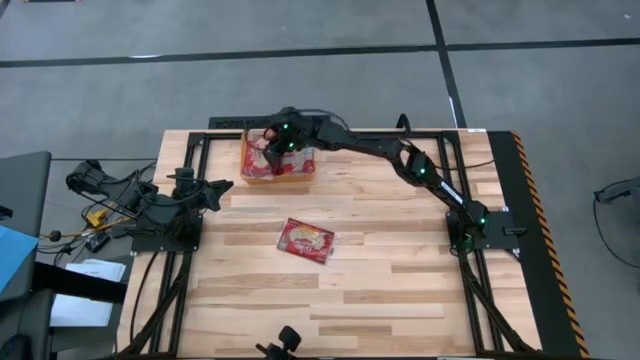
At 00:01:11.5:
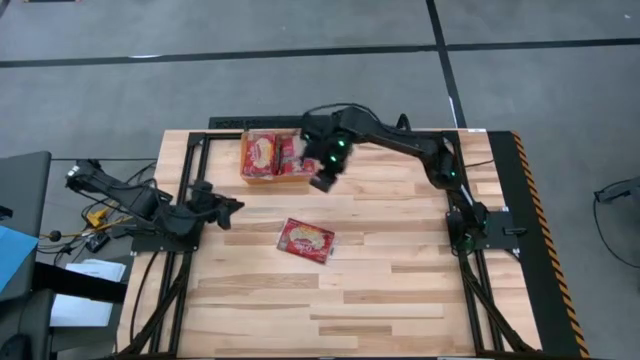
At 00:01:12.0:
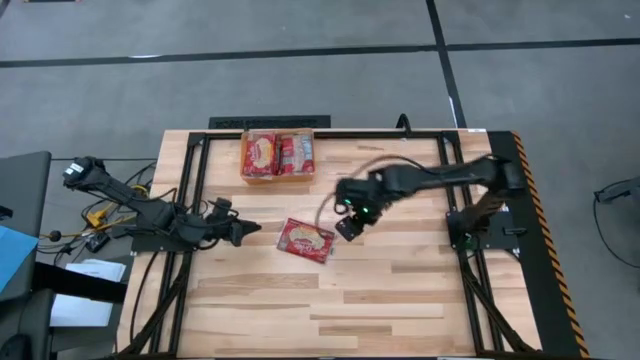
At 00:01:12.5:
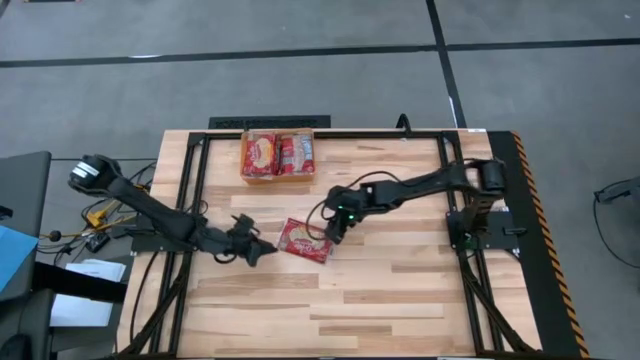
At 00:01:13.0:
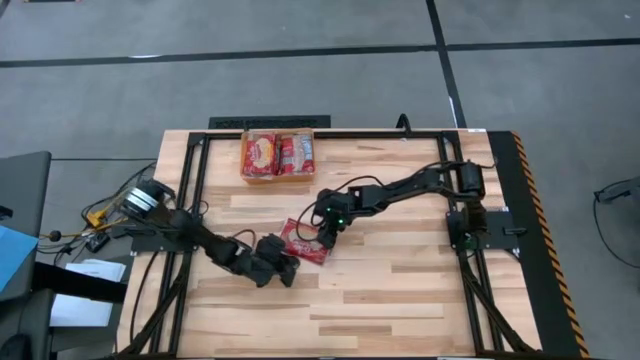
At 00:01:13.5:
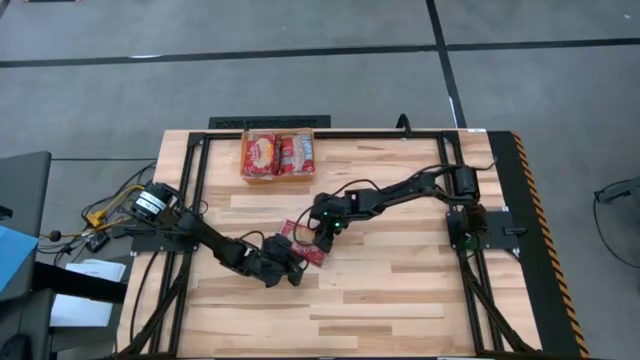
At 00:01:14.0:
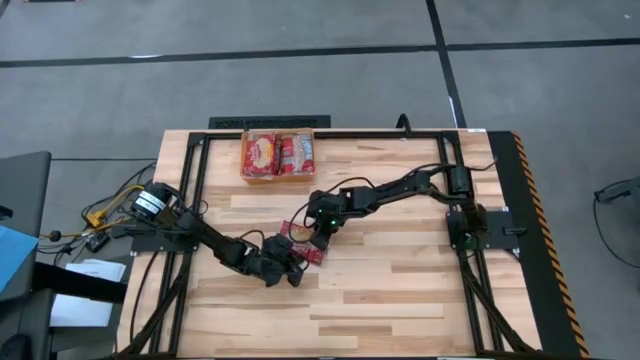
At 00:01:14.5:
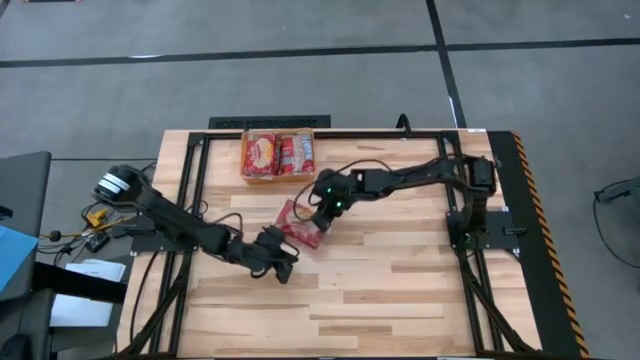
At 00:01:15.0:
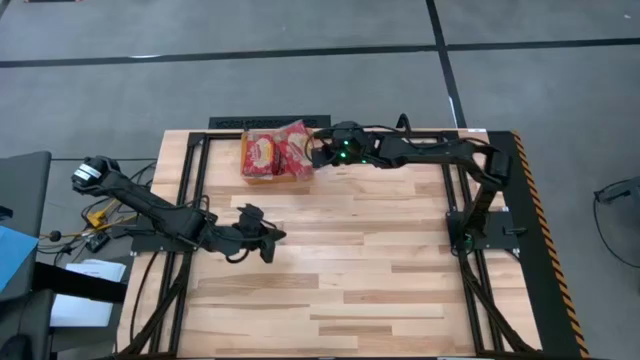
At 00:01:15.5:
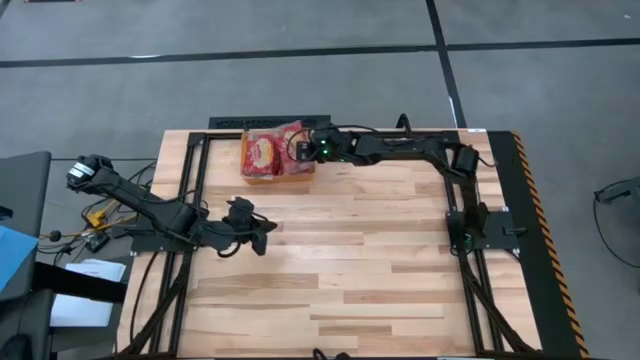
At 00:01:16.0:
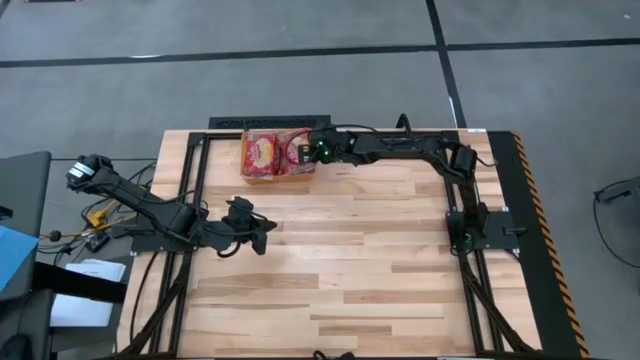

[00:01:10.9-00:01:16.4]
Task: Sort popcorn bags into baskets
Put the popcorn bag into the orange bin

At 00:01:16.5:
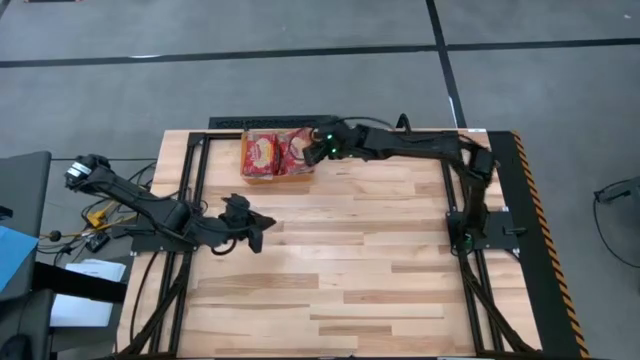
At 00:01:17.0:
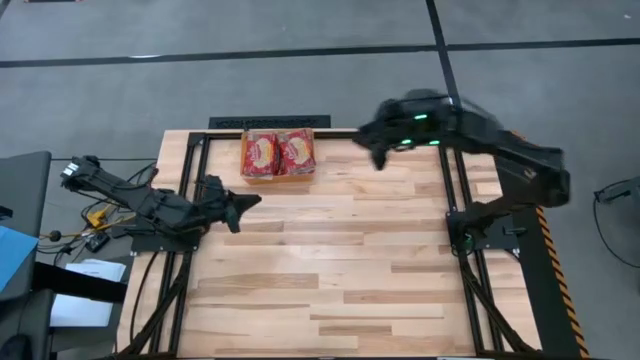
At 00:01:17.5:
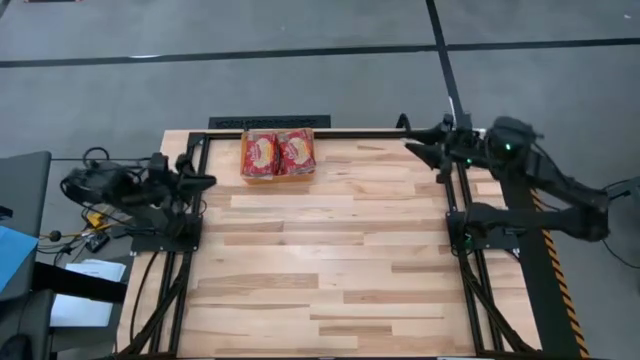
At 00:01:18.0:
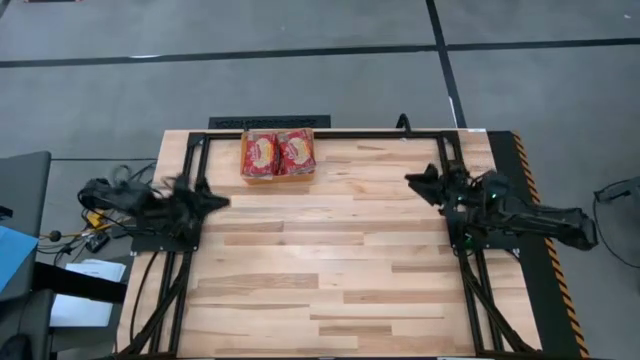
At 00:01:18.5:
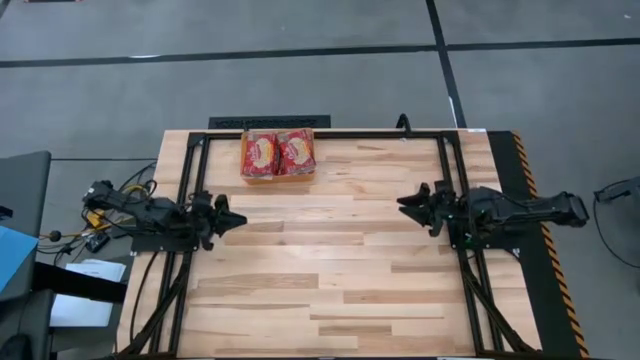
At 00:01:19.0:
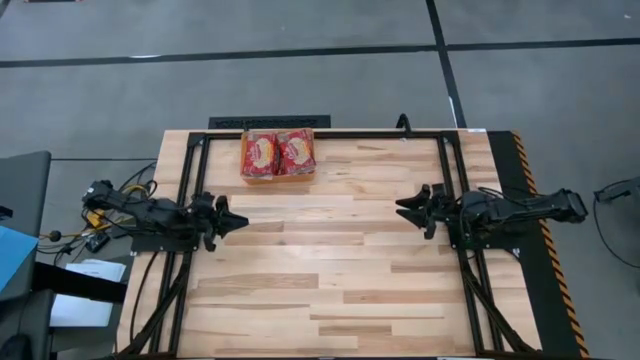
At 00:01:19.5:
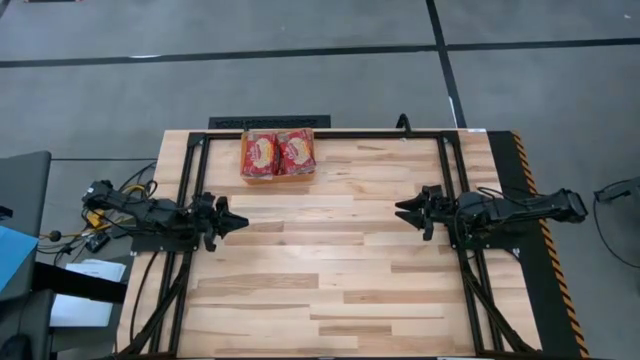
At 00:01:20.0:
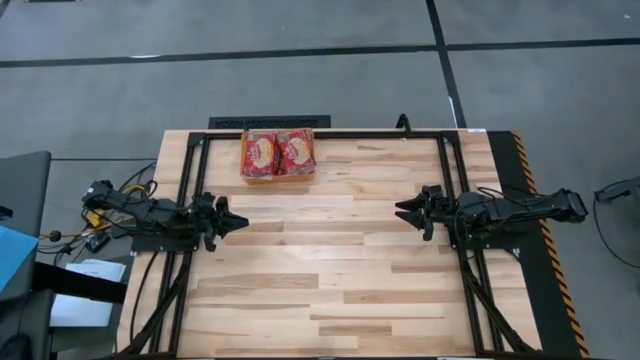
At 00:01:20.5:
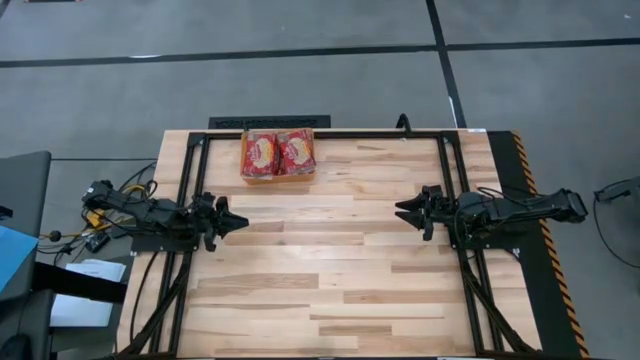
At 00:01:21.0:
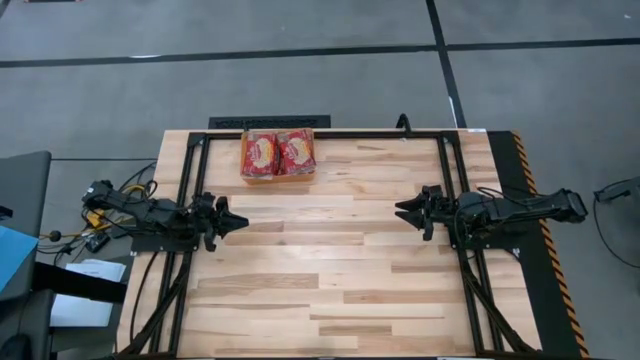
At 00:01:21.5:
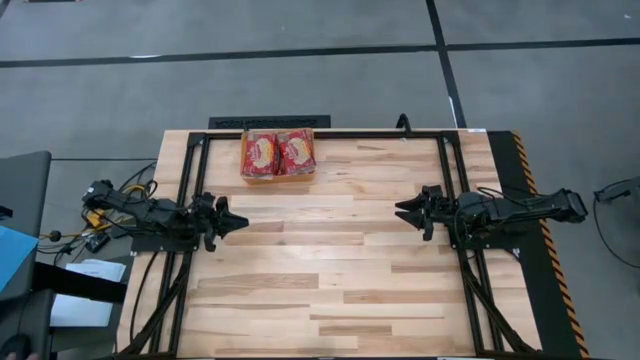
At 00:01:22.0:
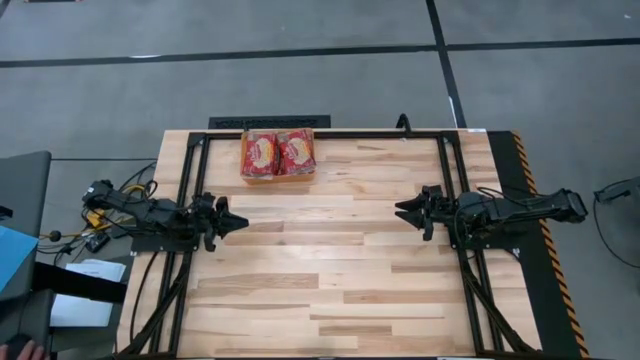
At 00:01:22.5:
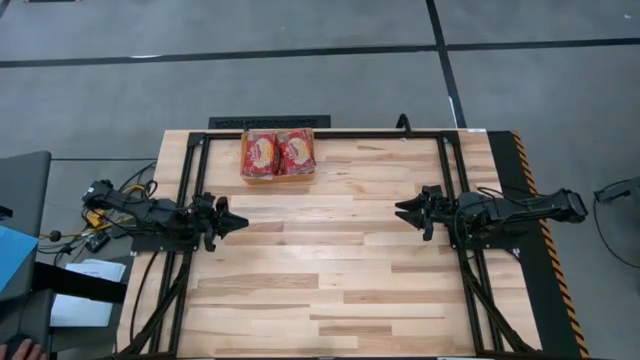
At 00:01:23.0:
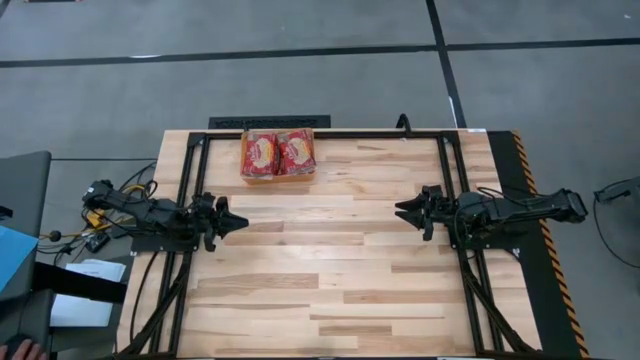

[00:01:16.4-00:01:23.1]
Return To Home Position

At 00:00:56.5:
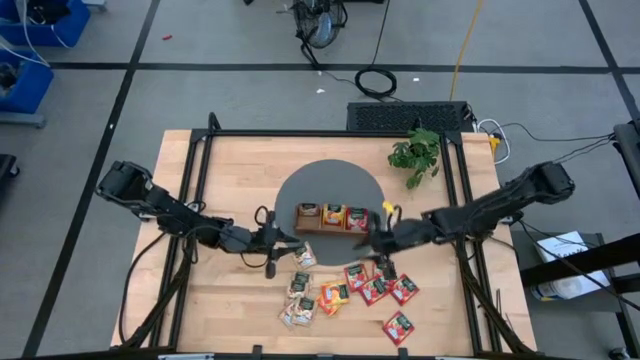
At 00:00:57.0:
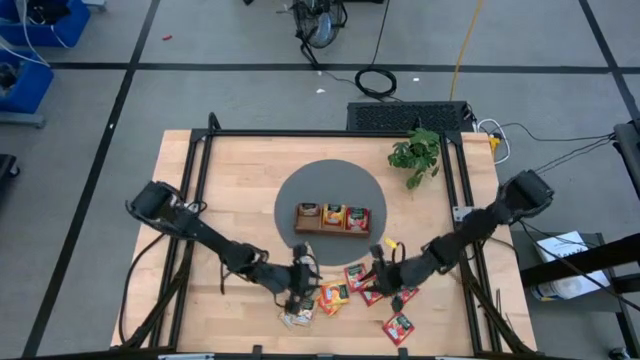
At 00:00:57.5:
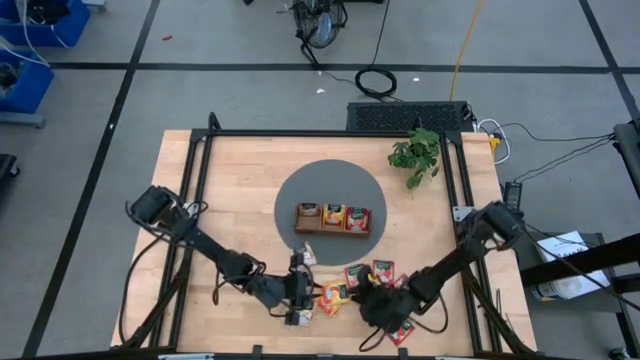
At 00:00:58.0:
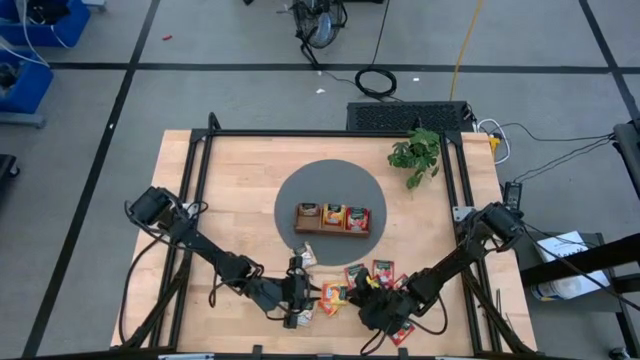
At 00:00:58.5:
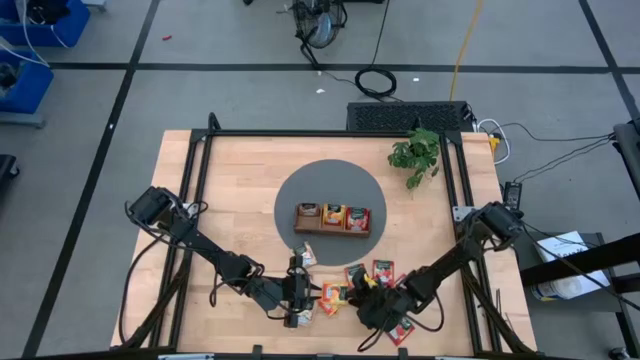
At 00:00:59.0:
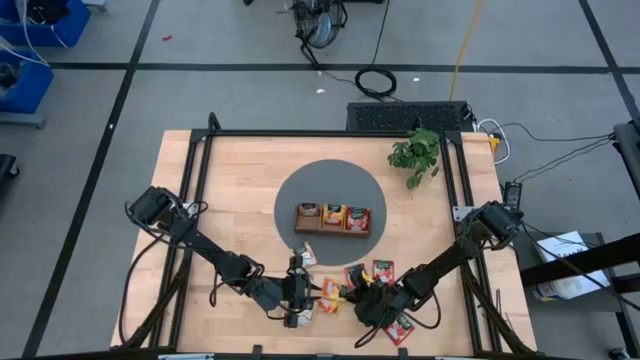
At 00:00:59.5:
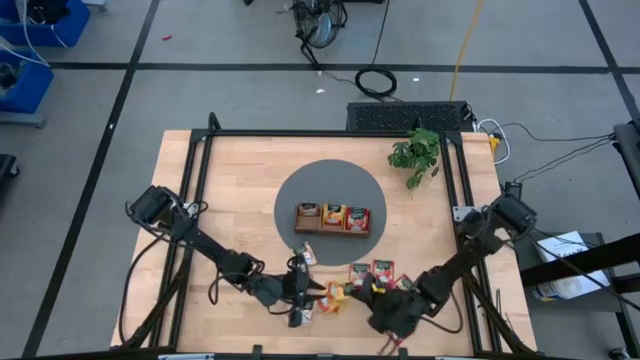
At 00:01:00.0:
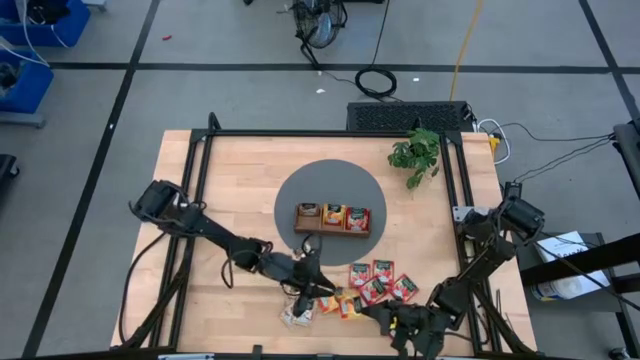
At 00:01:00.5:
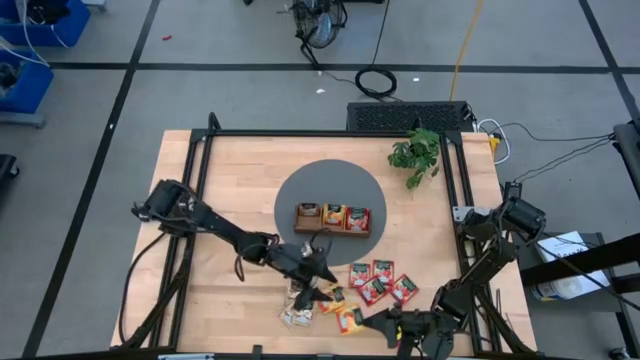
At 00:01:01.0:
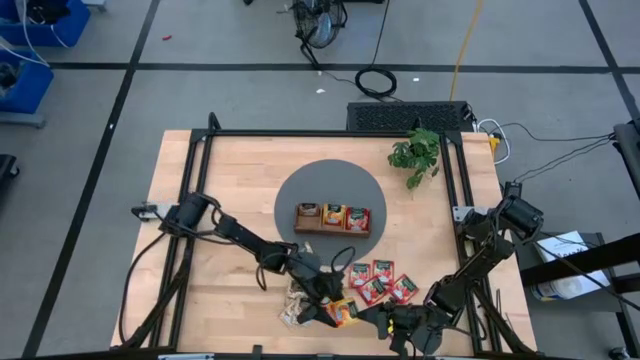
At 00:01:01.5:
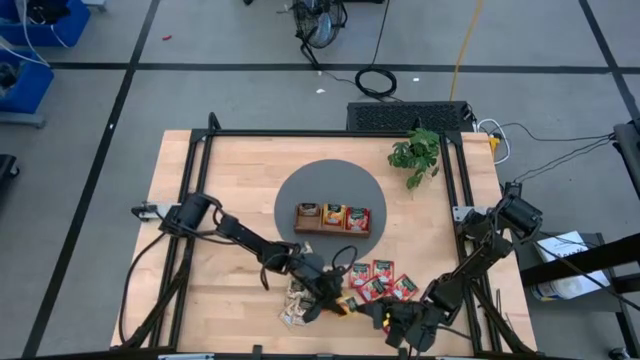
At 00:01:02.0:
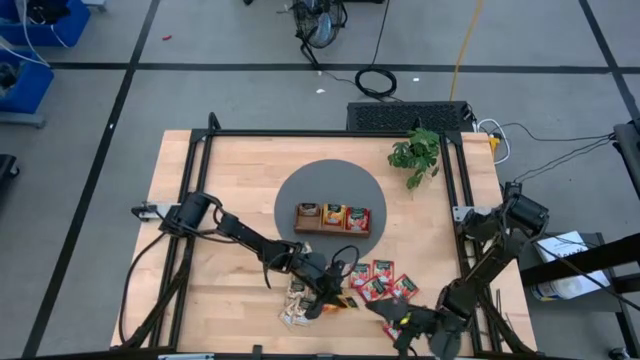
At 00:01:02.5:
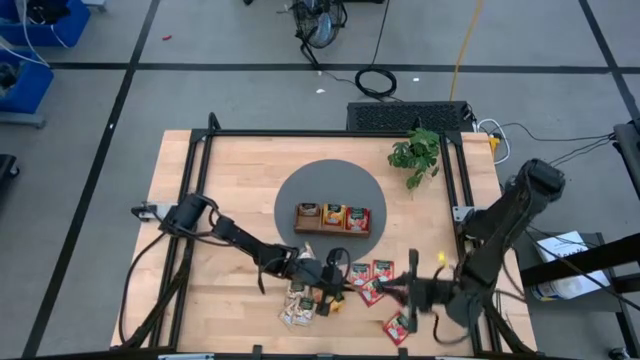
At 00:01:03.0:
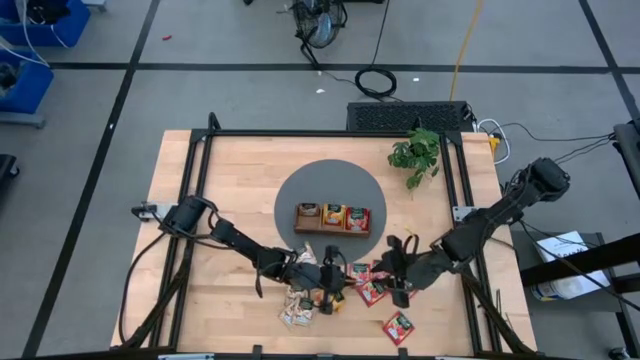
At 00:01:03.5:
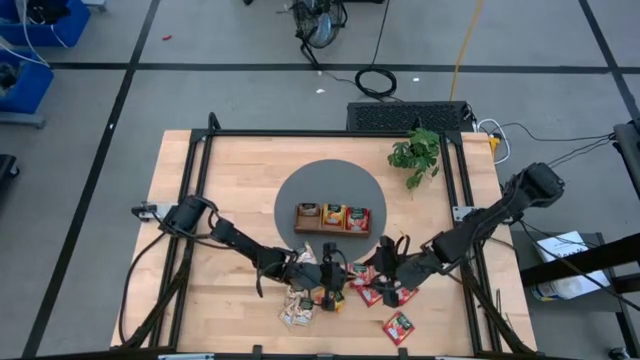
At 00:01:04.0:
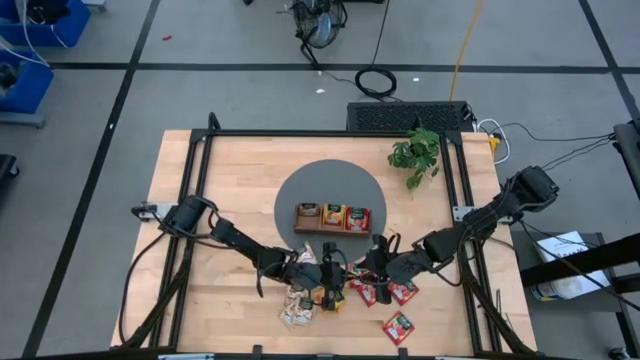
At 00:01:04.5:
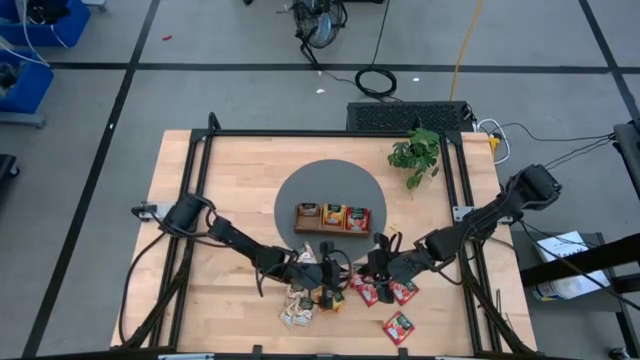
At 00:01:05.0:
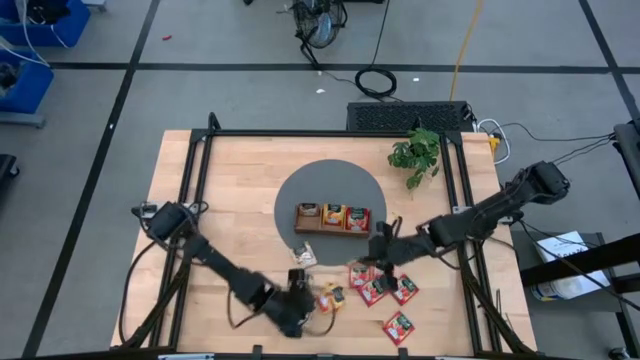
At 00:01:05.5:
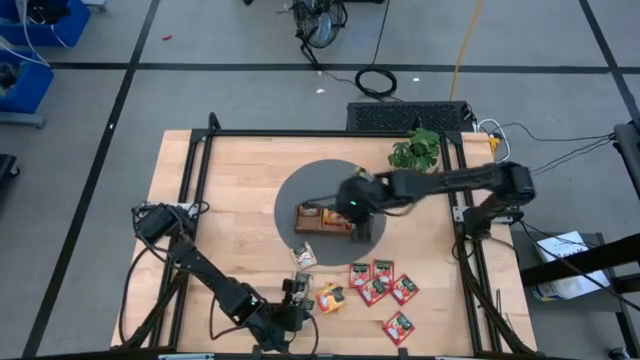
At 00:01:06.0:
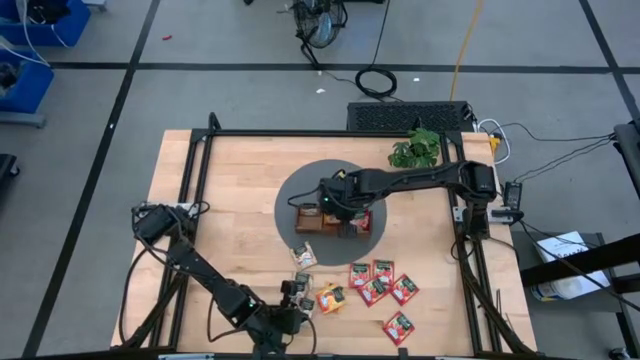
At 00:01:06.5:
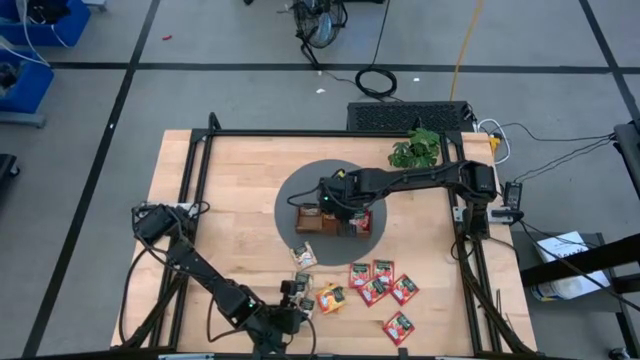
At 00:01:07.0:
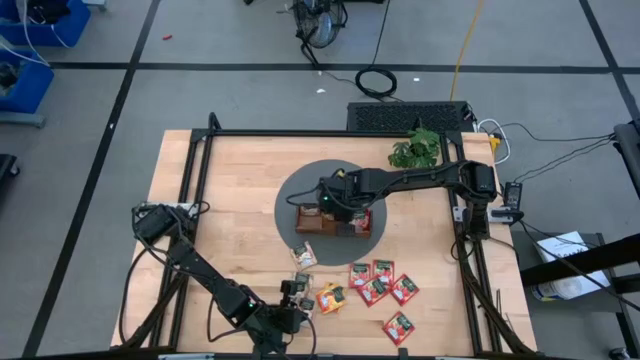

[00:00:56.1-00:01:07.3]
Task: Pick & Place Tea
Put the yellow tea bag into the middle section of the wooden organizer
